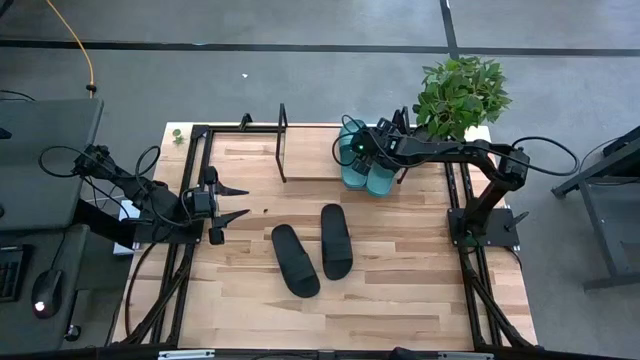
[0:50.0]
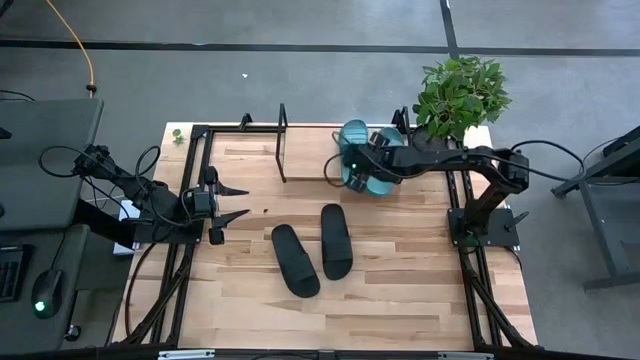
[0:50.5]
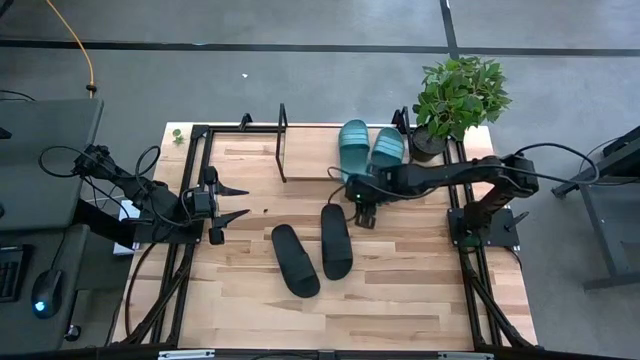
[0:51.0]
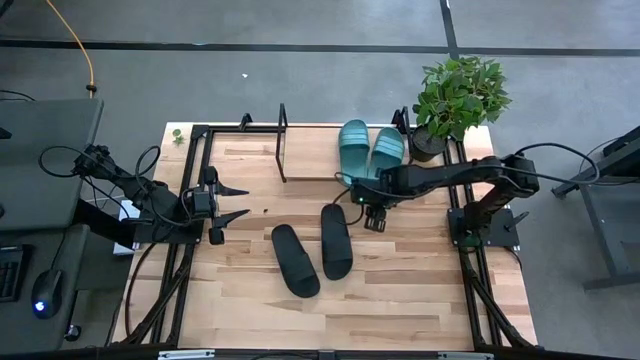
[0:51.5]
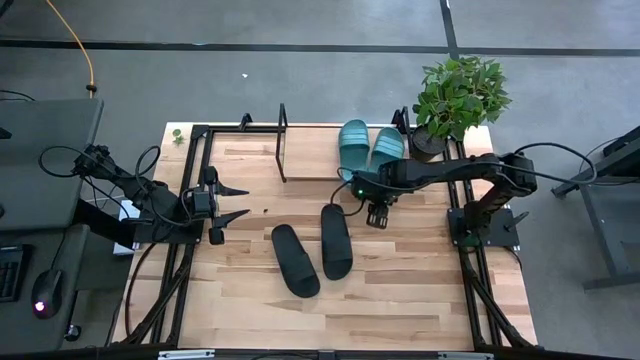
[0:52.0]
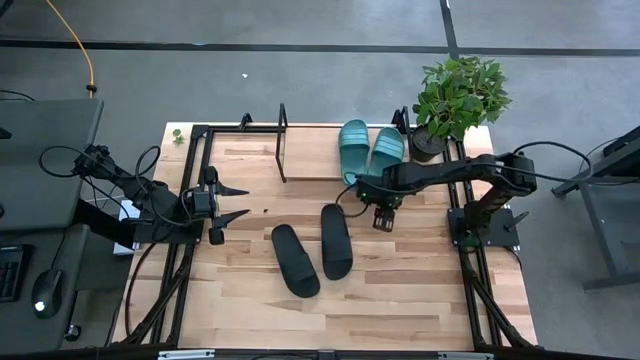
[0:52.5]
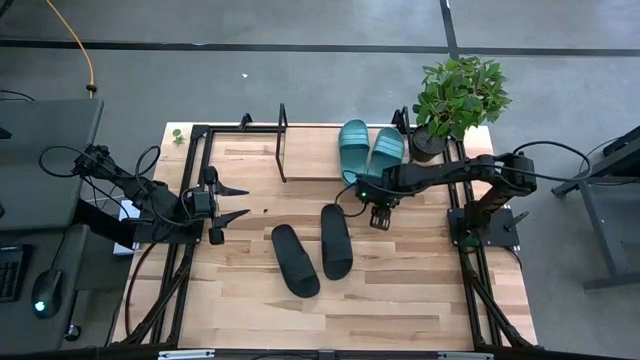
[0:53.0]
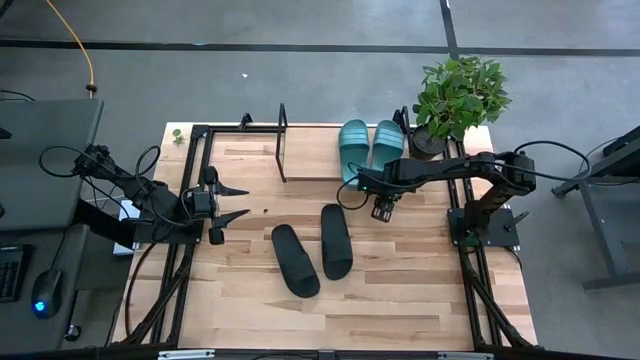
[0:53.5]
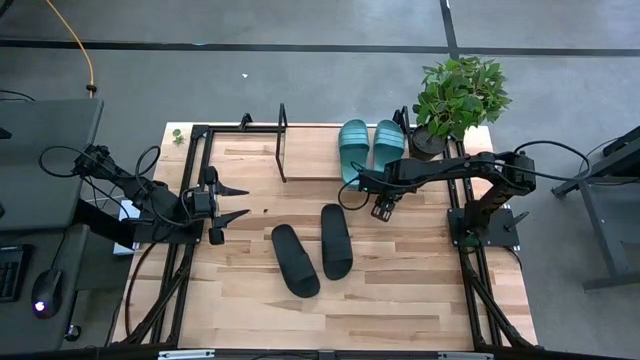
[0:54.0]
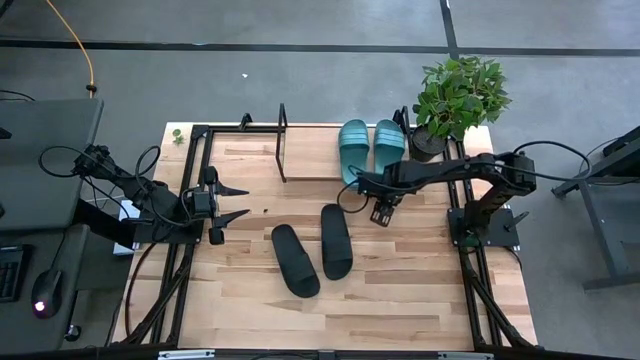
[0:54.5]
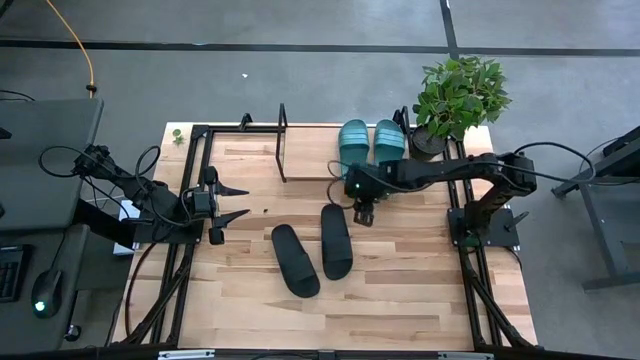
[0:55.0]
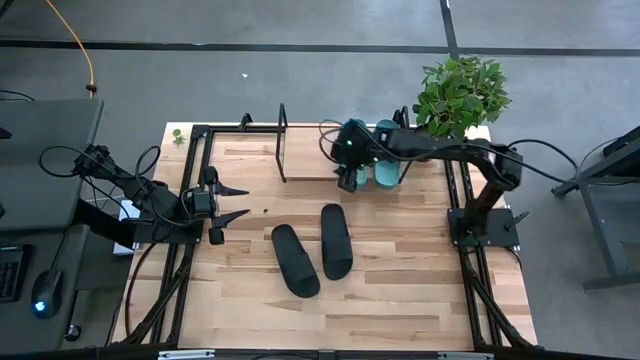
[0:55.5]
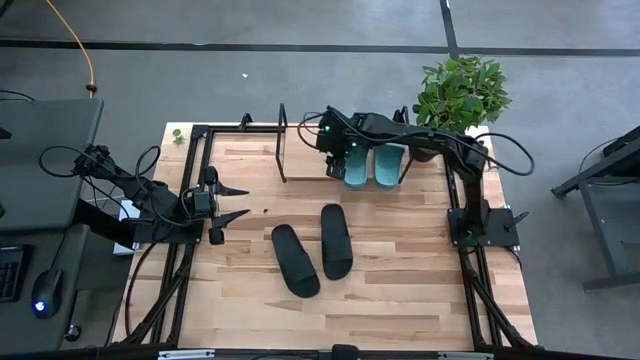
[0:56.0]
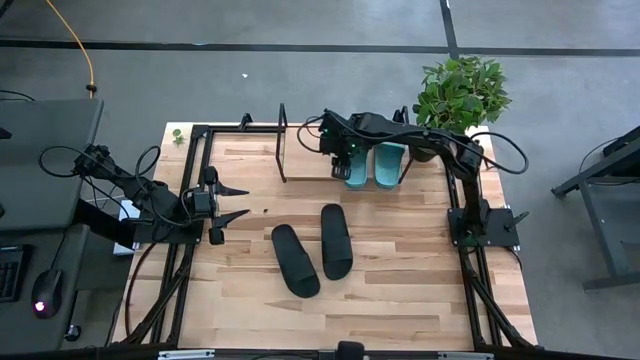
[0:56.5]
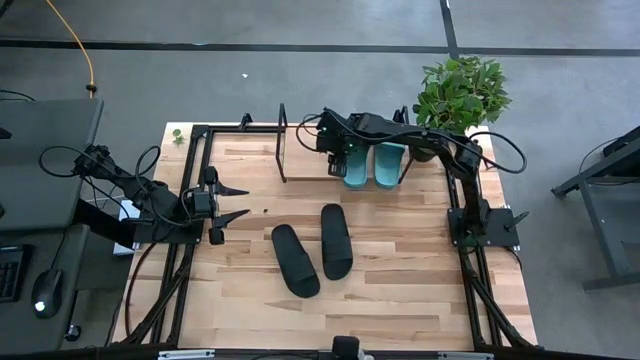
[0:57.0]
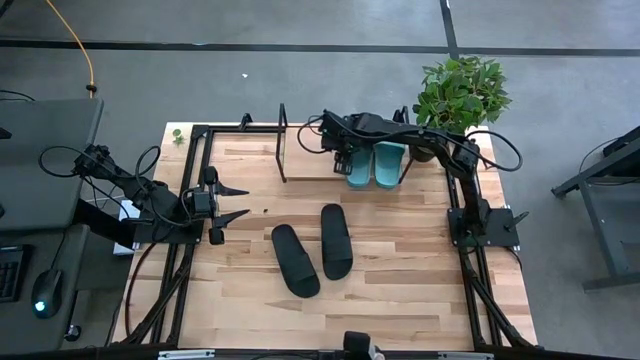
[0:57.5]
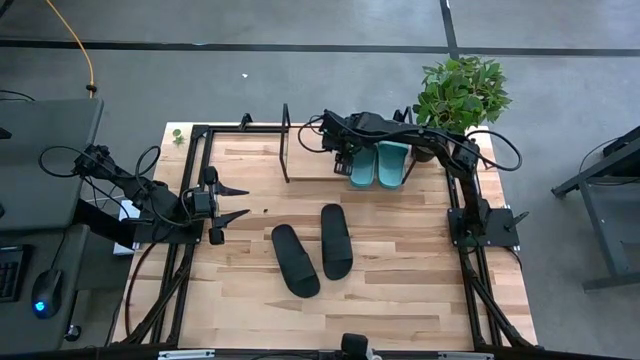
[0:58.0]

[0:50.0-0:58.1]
Task: Pick and place slides into the shelf
Adjust the green slides on the shelf

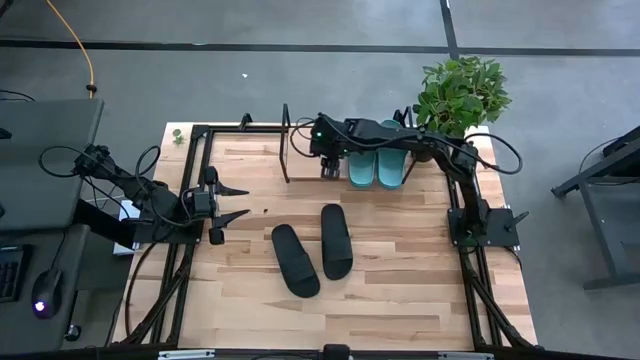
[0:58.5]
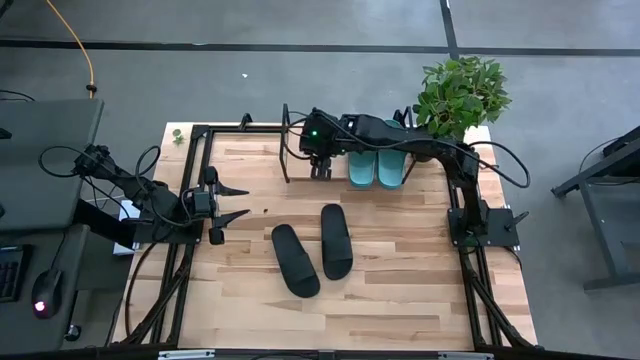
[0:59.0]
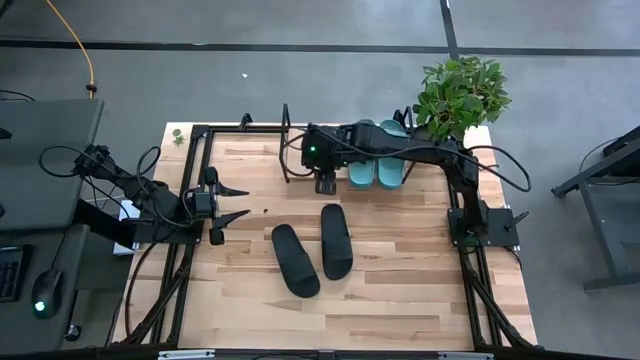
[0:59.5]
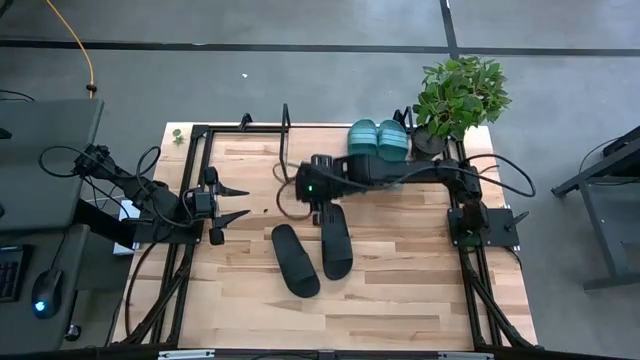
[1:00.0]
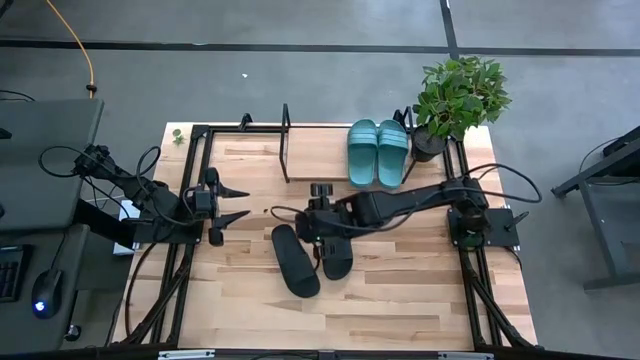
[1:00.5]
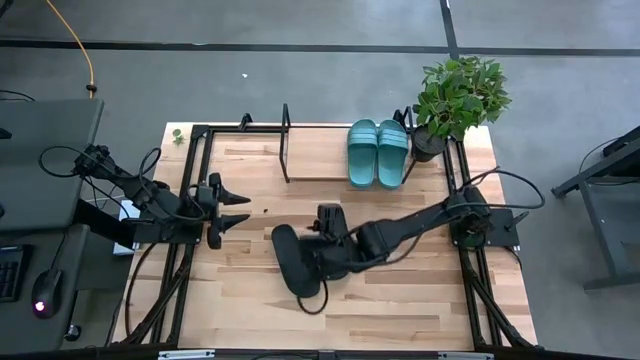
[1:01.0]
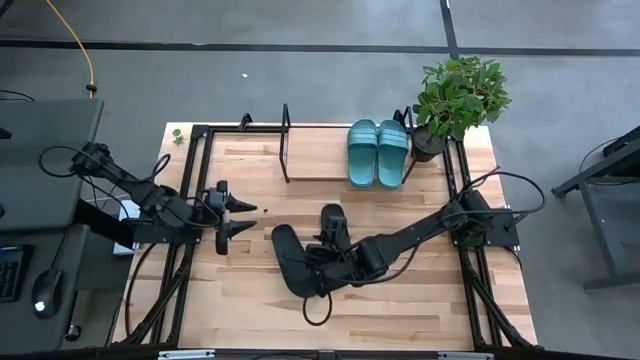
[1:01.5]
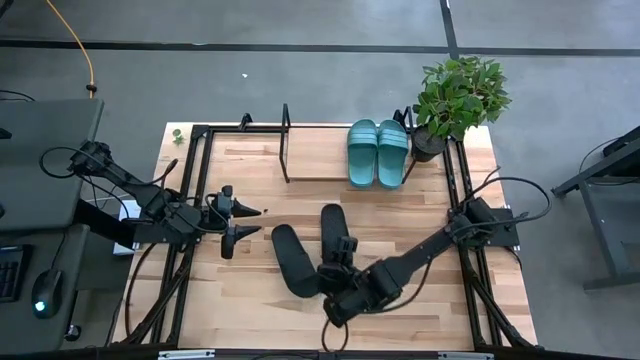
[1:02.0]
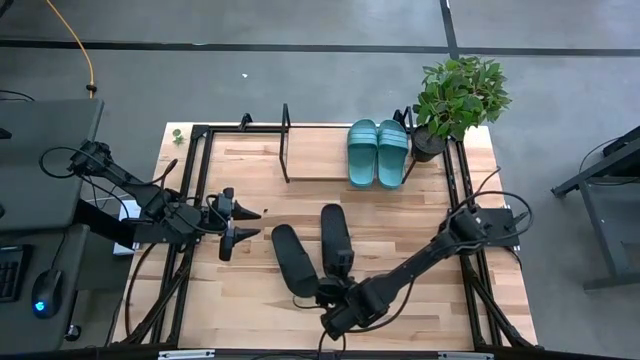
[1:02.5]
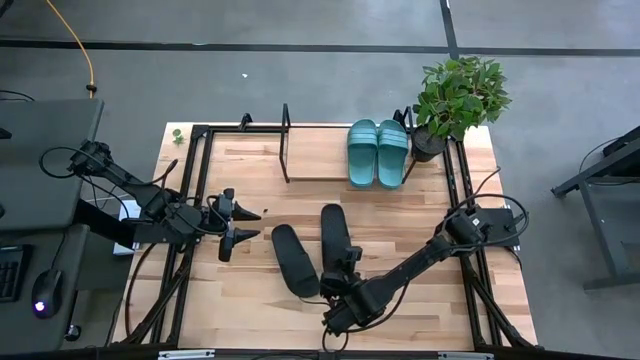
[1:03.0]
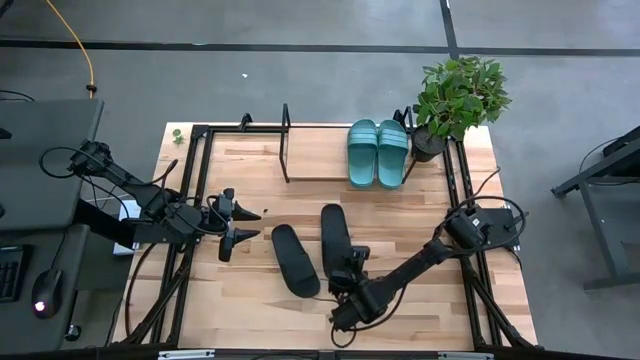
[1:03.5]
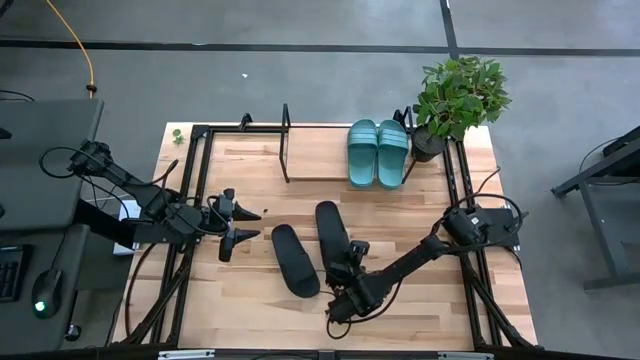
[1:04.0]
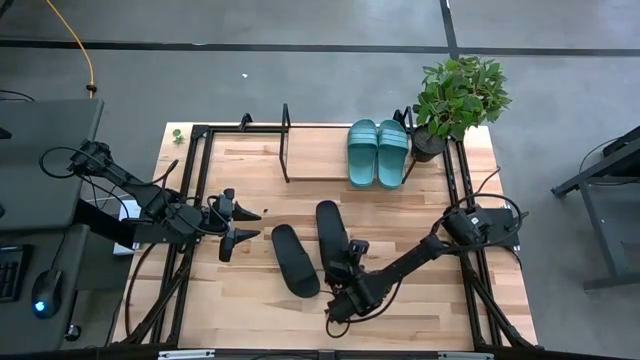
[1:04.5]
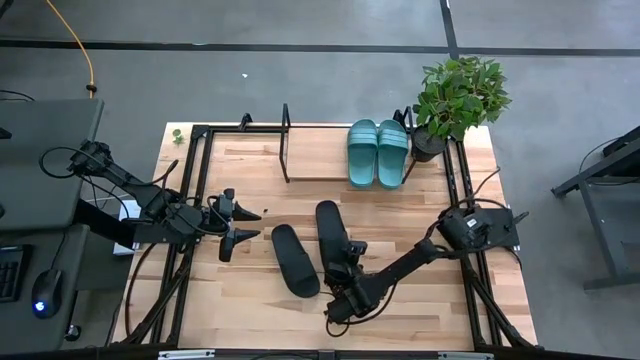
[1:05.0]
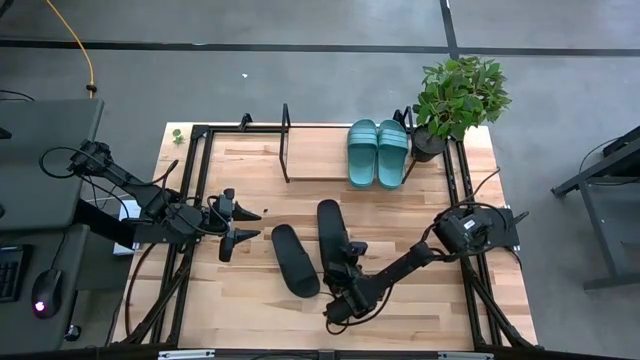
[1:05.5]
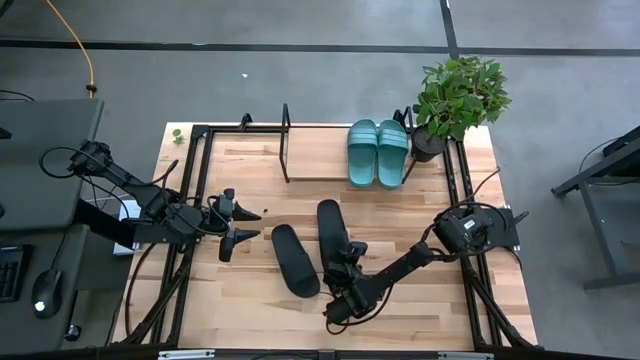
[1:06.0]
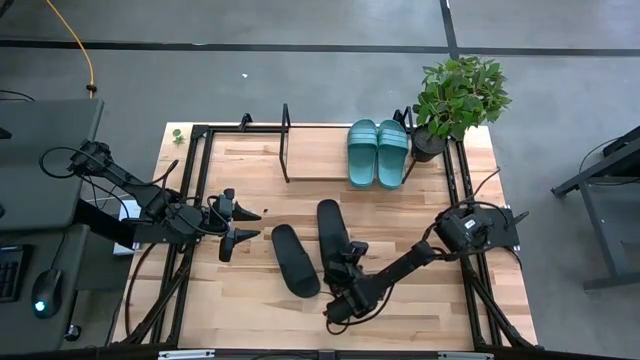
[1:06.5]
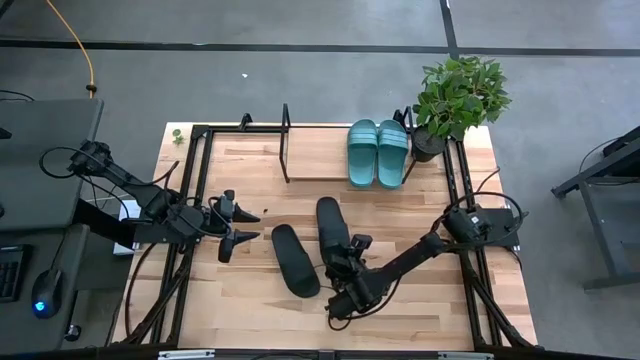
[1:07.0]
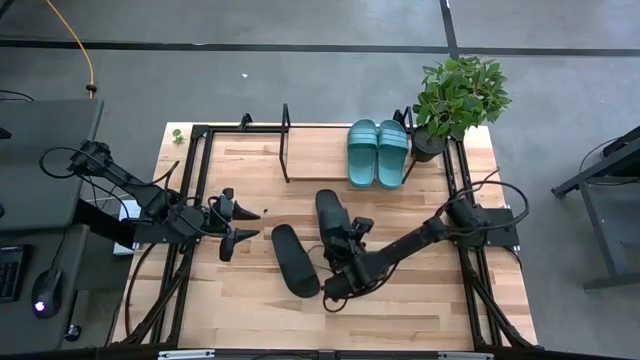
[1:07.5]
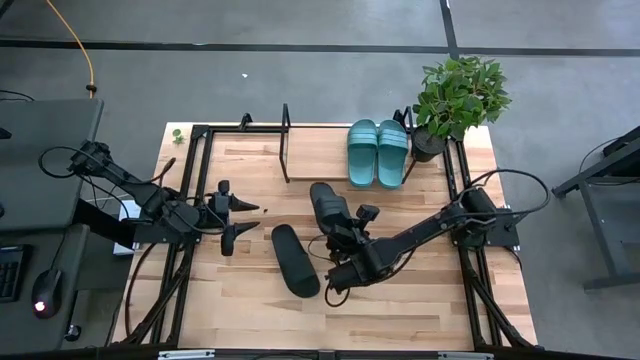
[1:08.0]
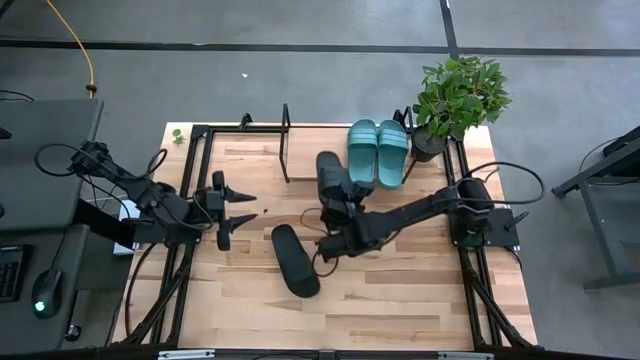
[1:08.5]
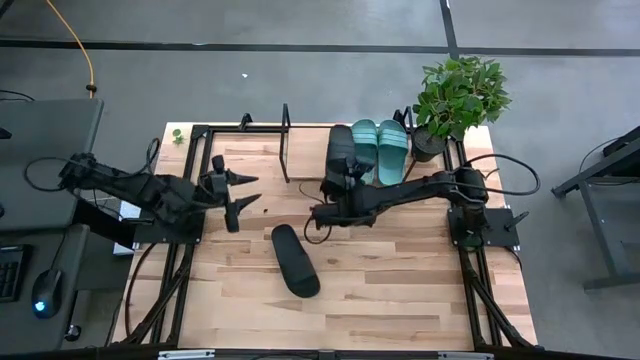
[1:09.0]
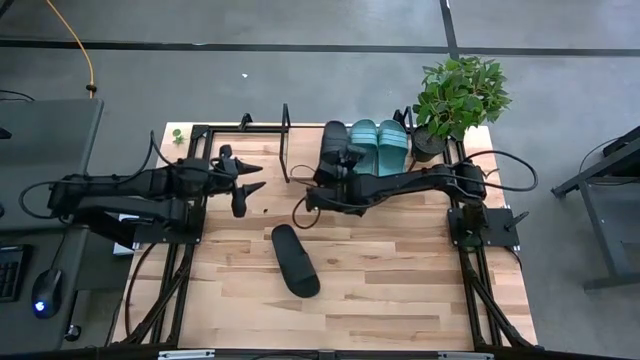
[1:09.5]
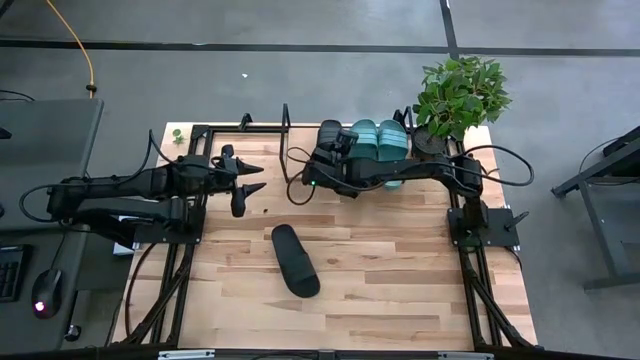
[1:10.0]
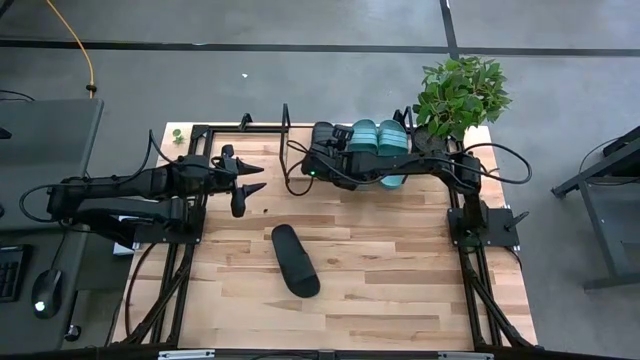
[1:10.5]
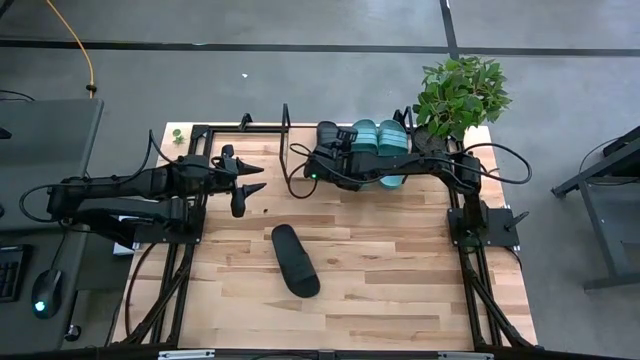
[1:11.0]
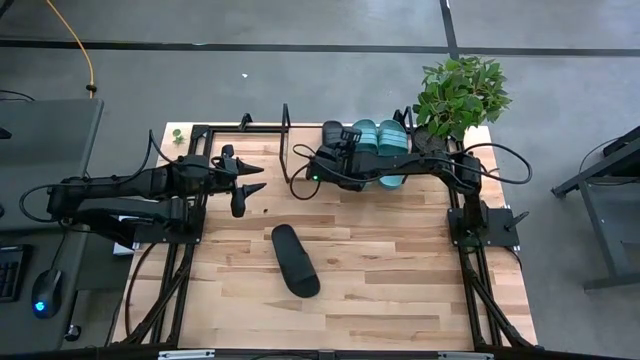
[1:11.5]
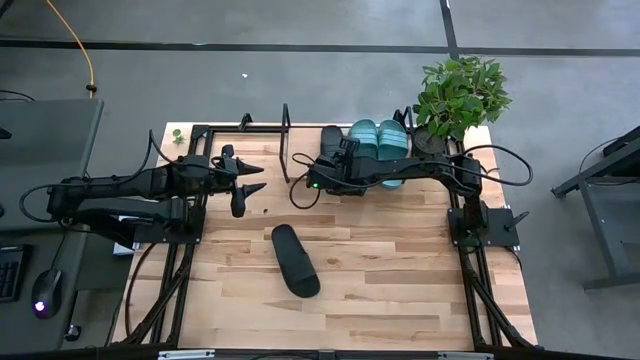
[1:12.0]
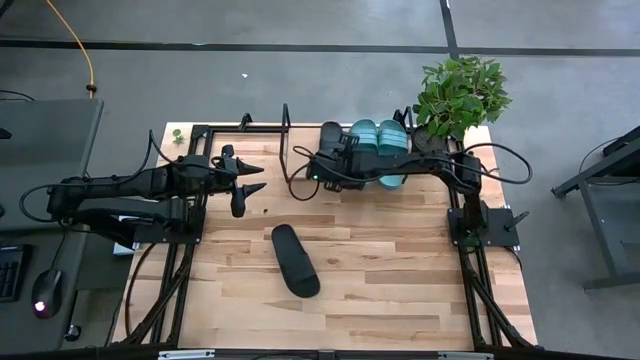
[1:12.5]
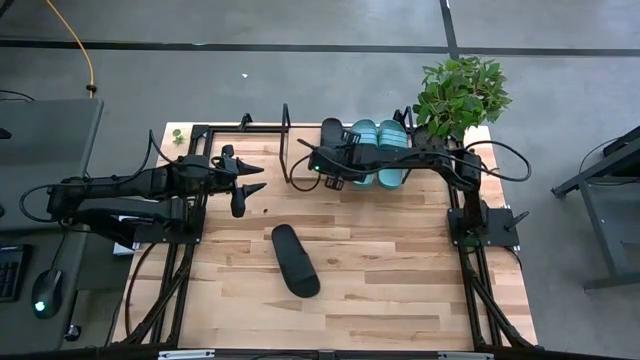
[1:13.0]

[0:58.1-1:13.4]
Put the right black slide on the shelf
